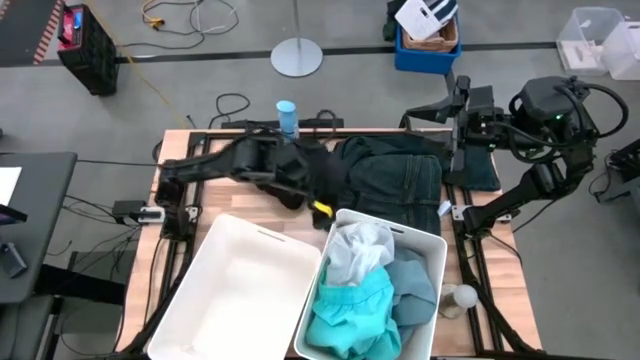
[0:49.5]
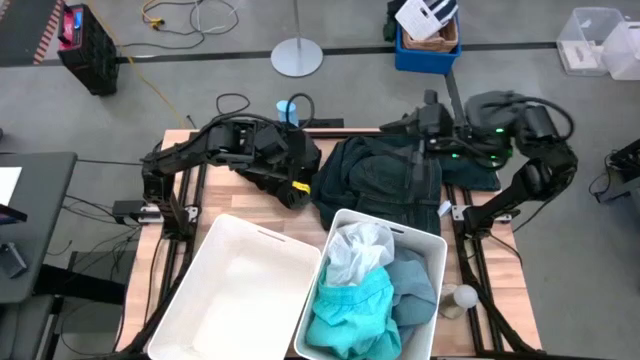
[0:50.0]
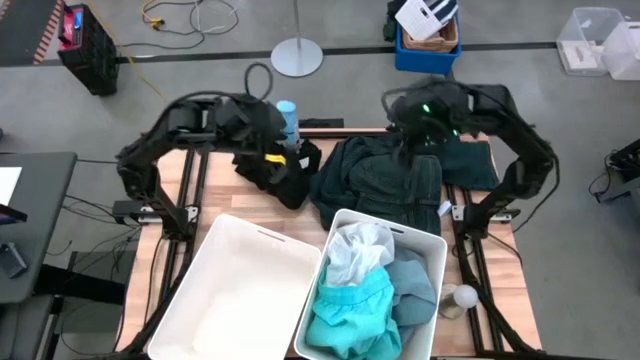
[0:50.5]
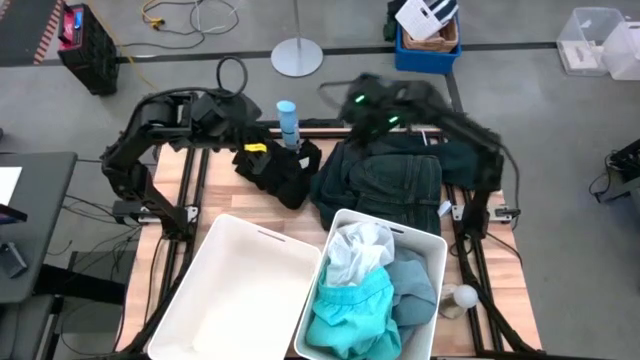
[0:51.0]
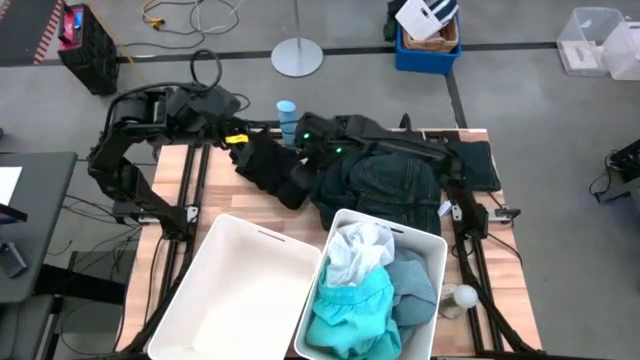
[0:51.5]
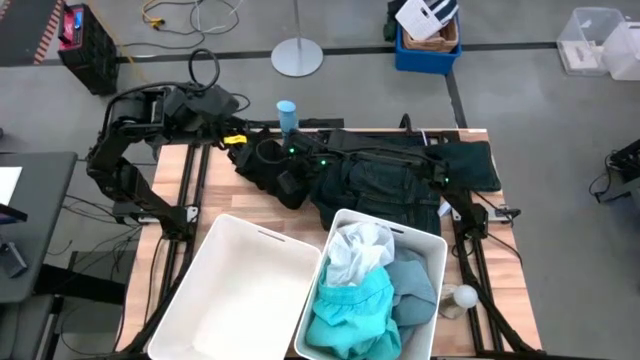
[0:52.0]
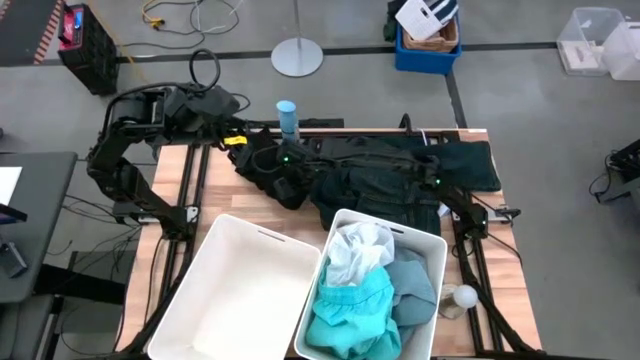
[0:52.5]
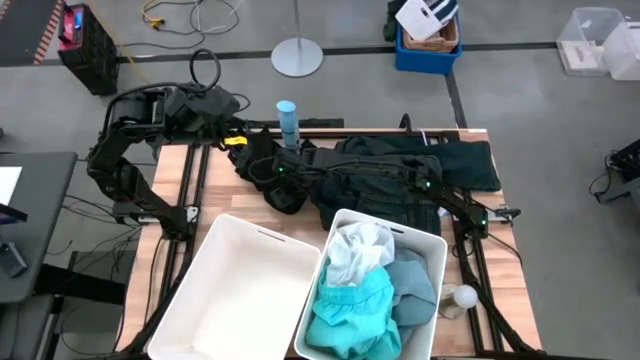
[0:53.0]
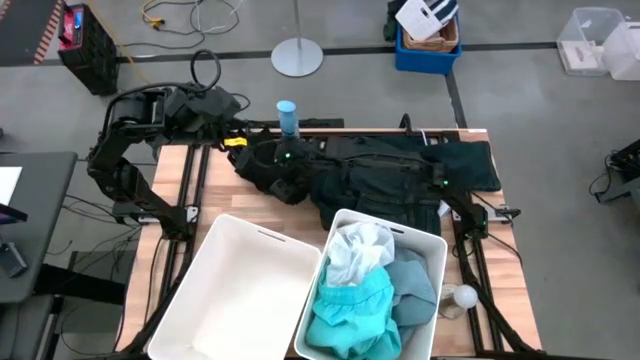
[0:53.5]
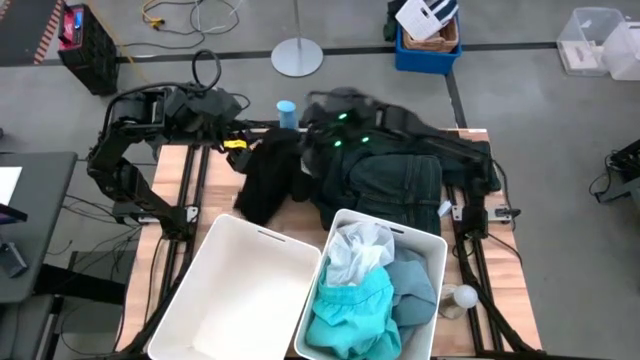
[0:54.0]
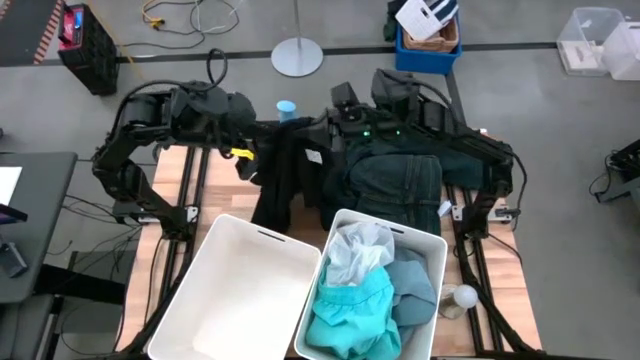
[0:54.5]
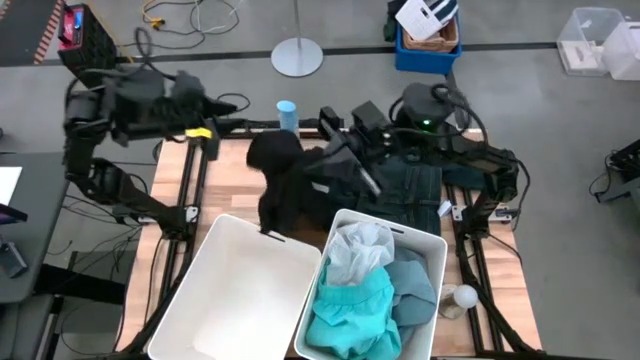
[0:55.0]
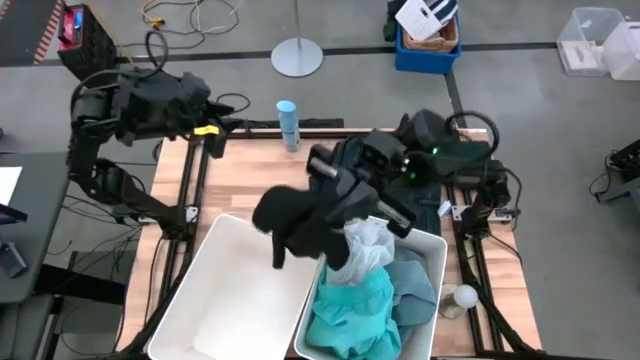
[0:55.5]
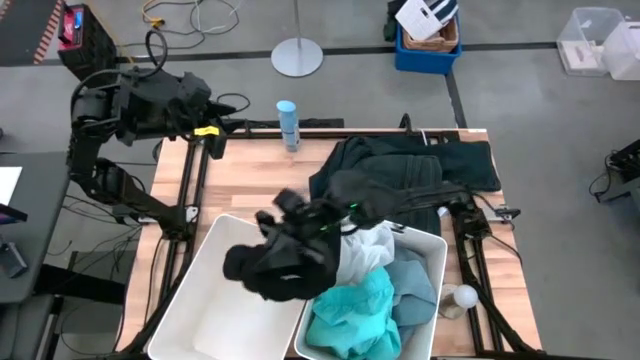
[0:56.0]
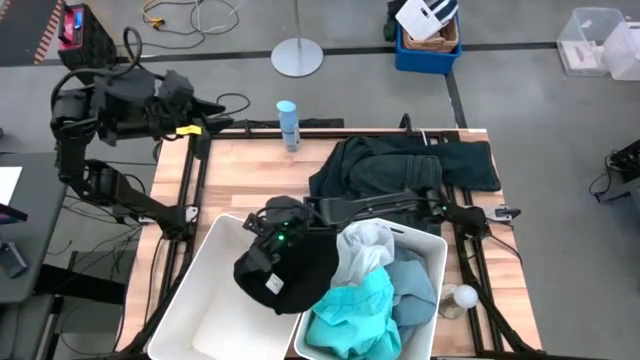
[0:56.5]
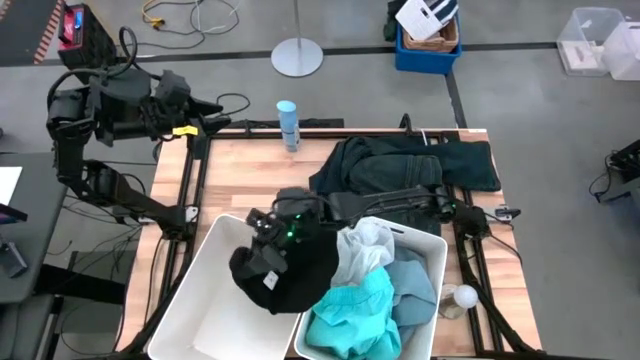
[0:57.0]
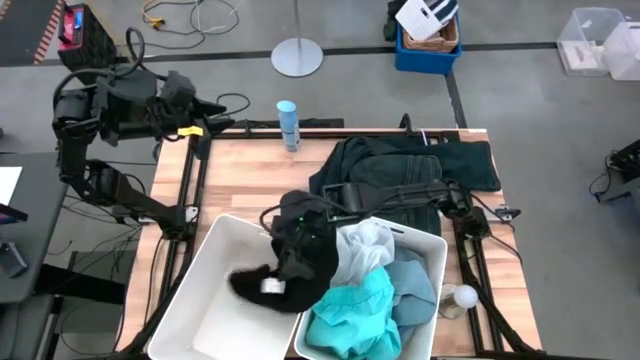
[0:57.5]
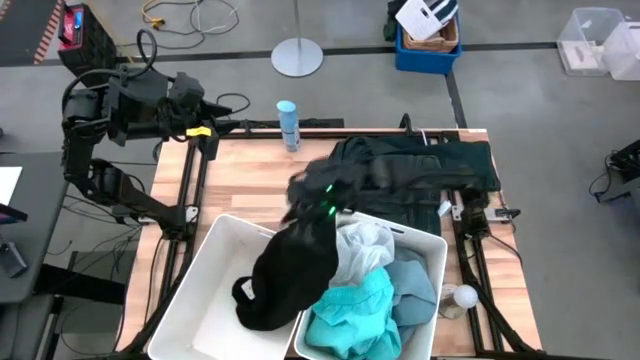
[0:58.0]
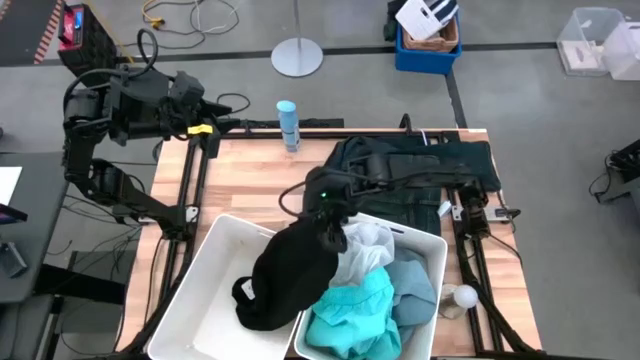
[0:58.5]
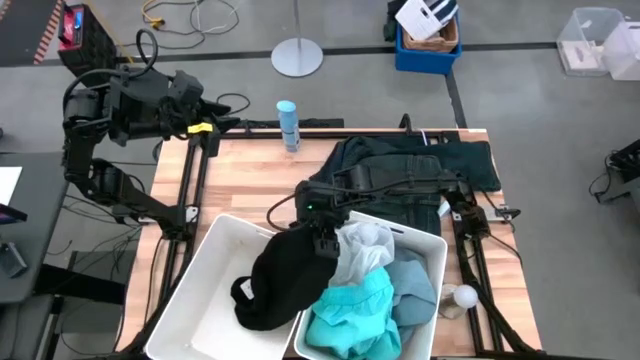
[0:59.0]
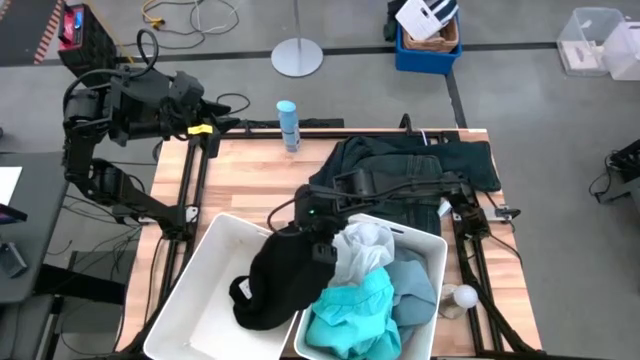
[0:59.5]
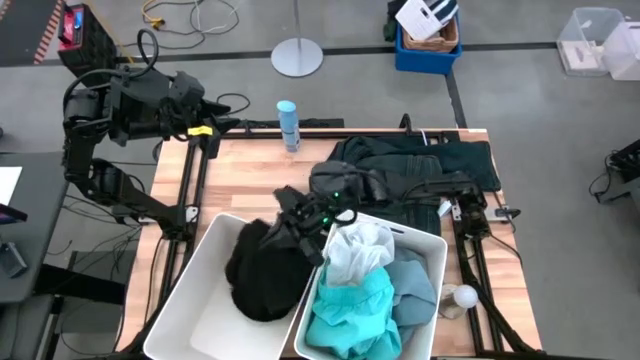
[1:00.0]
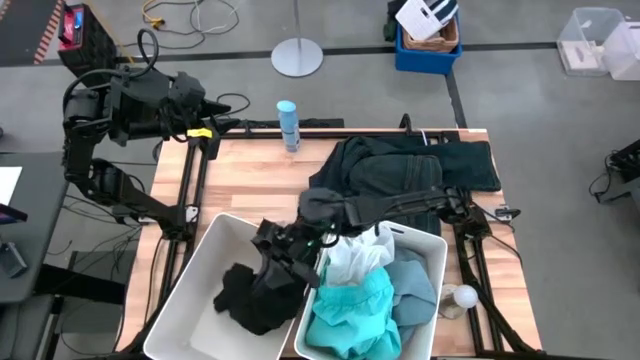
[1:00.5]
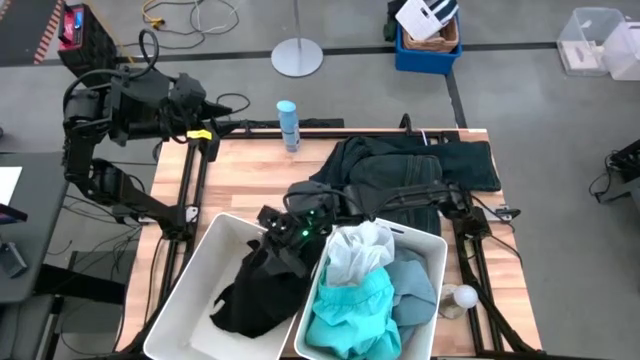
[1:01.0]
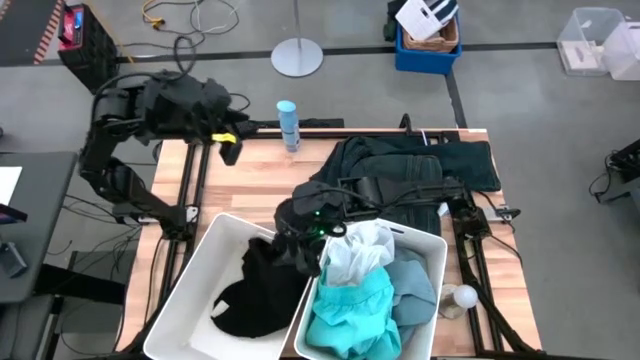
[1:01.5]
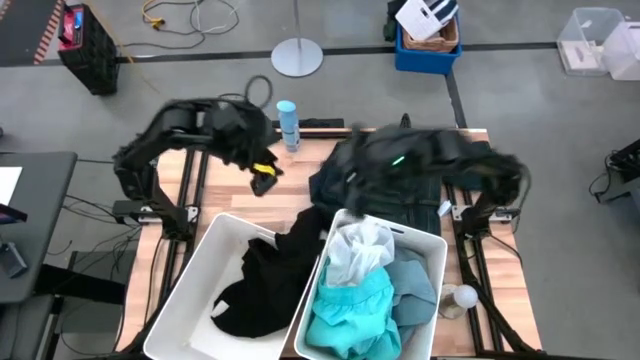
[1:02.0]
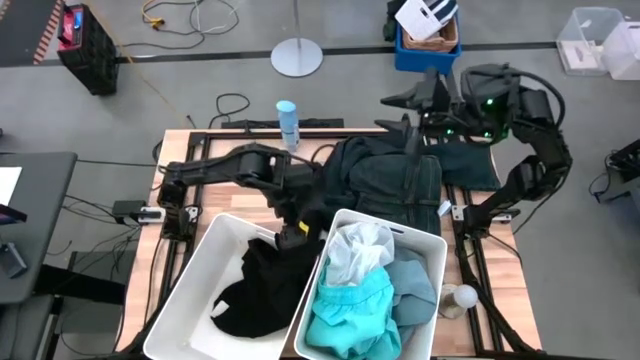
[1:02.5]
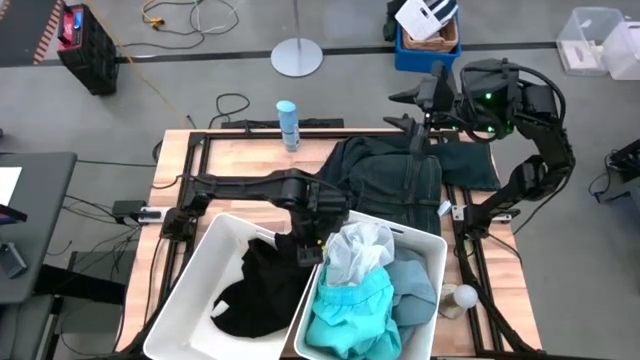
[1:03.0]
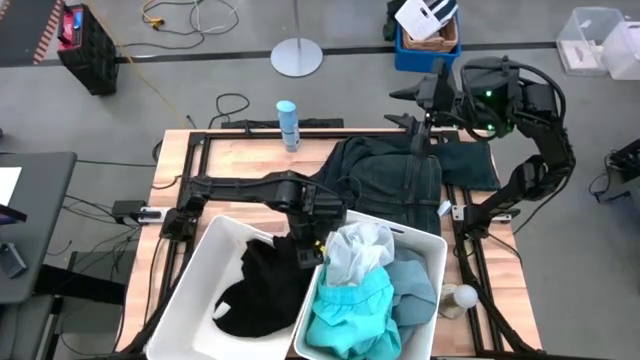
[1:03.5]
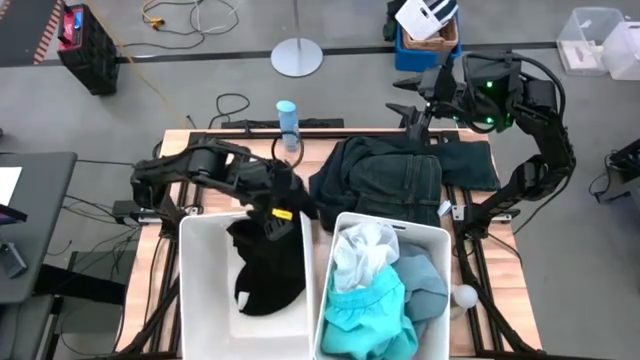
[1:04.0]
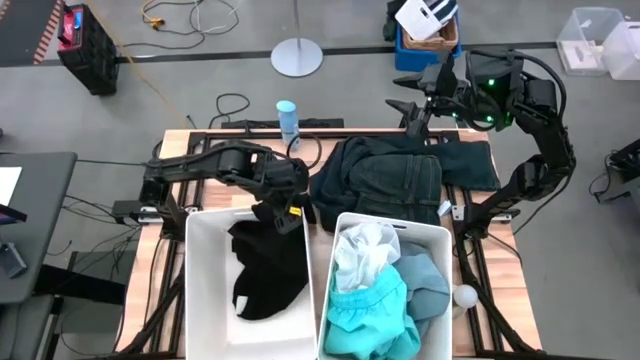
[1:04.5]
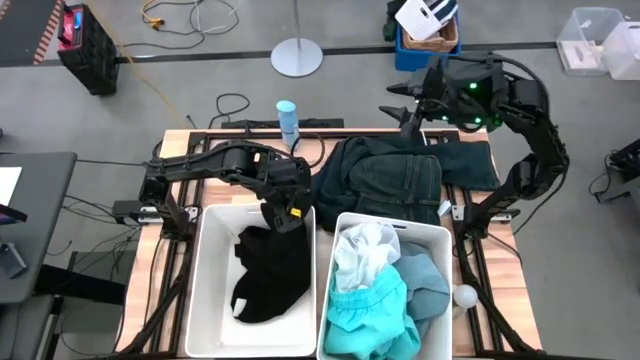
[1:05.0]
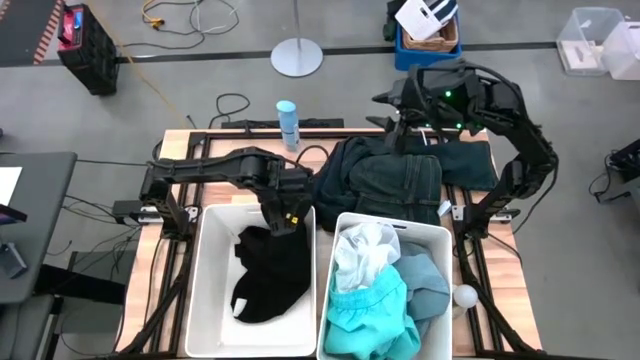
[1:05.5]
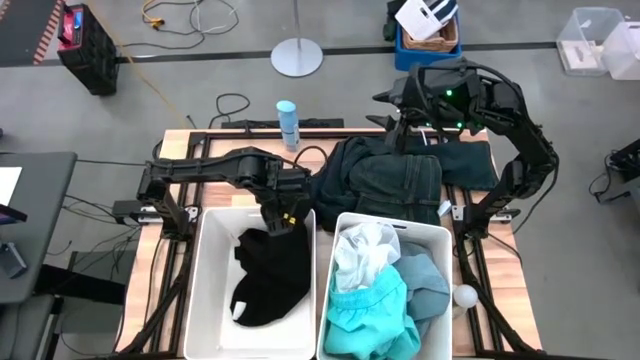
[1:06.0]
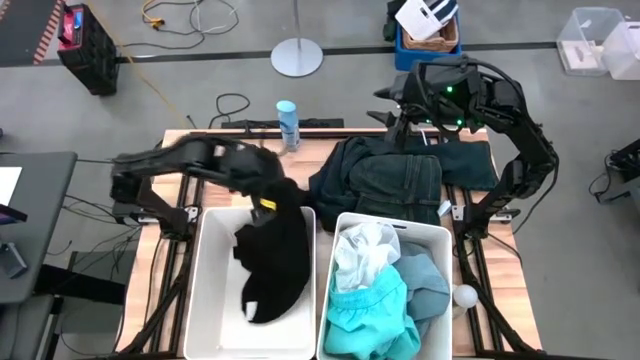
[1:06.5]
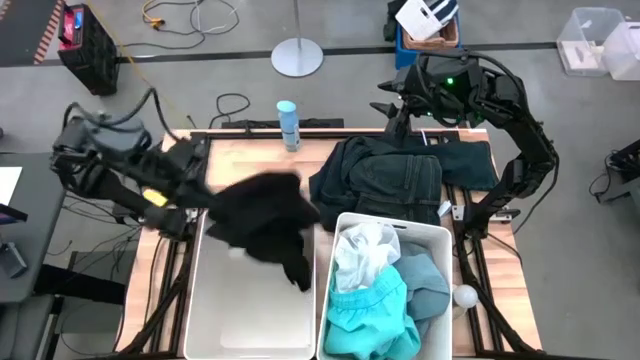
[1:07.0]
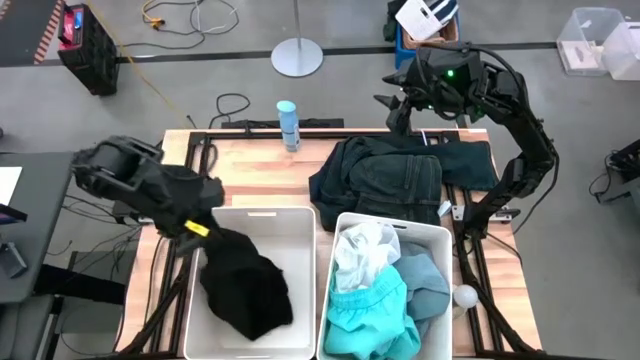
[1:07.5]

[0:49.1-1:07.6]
Task: Sort clothes
Put the black shirt into the left white bin
